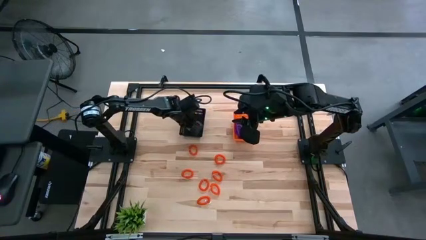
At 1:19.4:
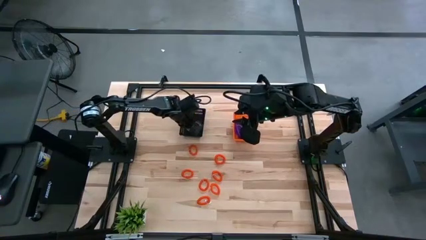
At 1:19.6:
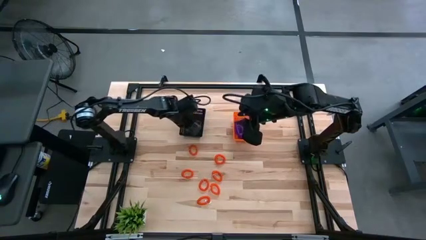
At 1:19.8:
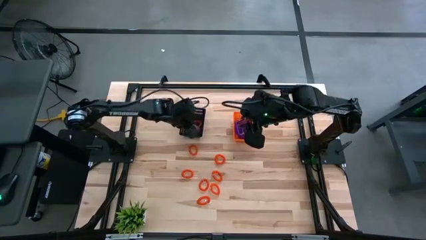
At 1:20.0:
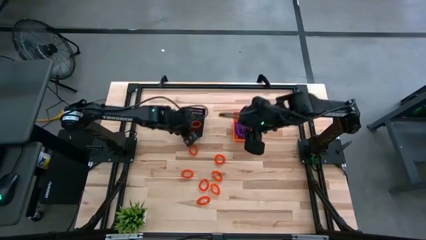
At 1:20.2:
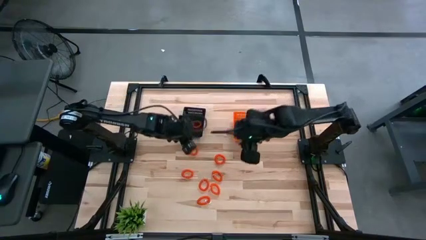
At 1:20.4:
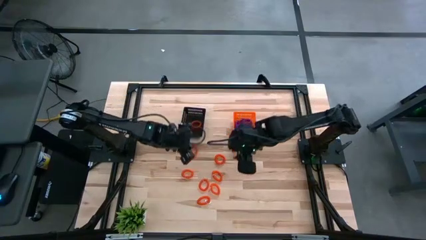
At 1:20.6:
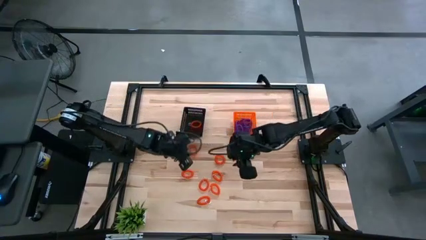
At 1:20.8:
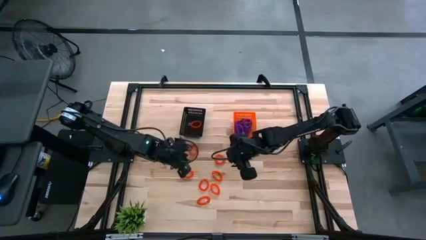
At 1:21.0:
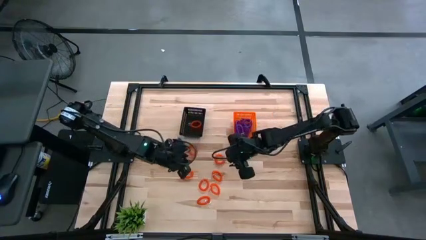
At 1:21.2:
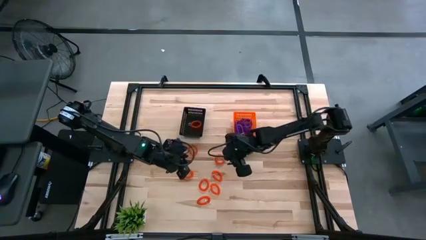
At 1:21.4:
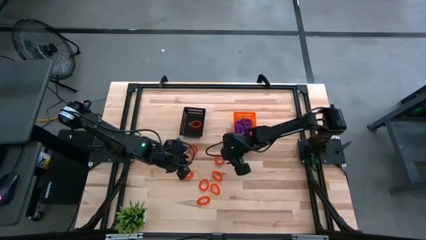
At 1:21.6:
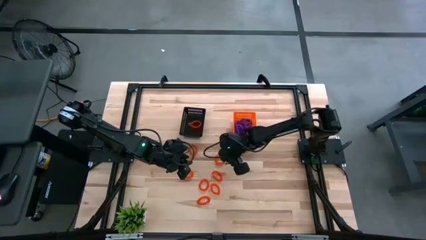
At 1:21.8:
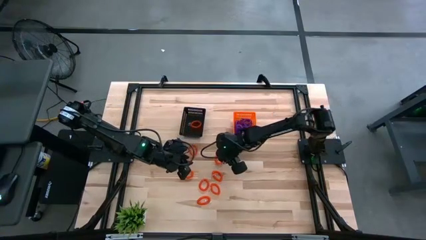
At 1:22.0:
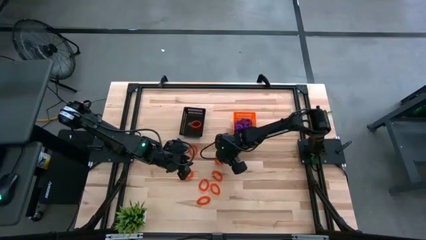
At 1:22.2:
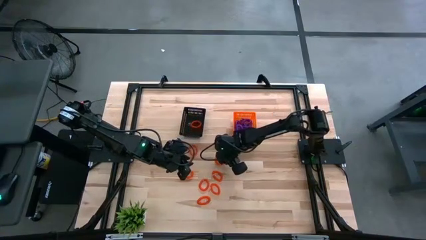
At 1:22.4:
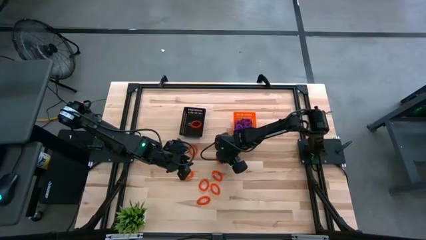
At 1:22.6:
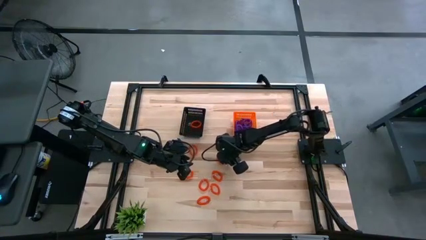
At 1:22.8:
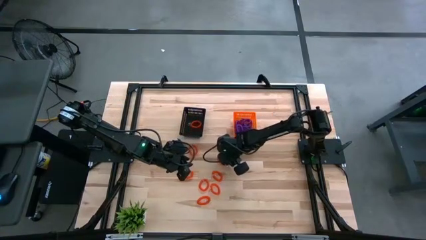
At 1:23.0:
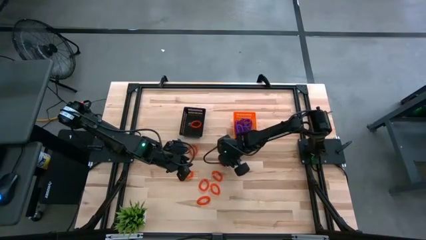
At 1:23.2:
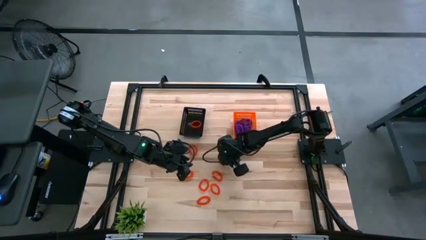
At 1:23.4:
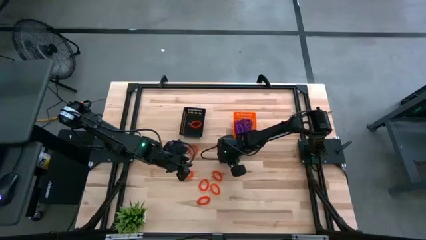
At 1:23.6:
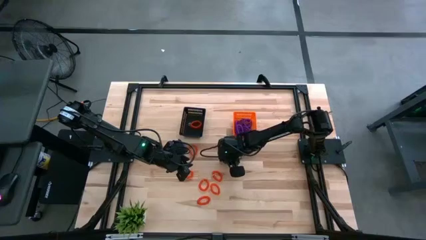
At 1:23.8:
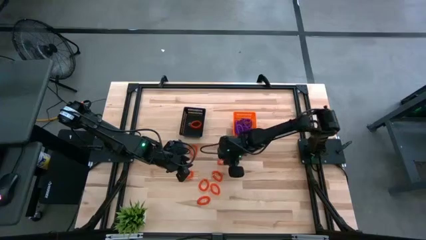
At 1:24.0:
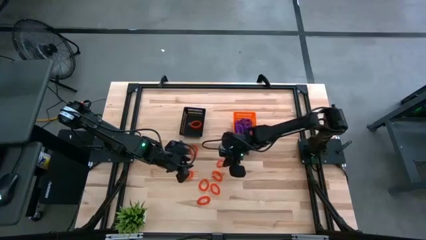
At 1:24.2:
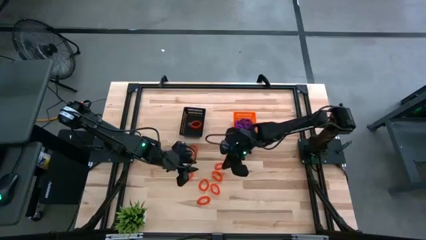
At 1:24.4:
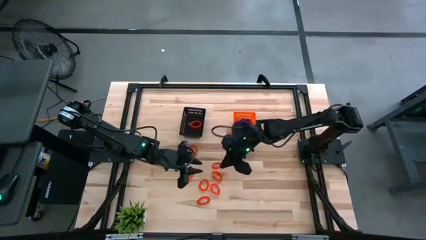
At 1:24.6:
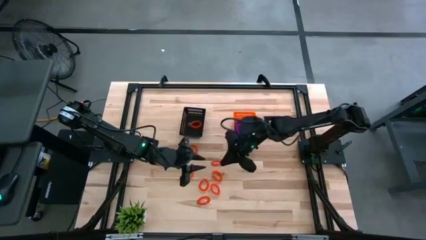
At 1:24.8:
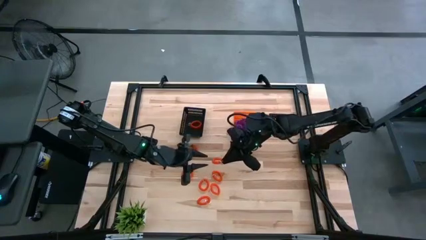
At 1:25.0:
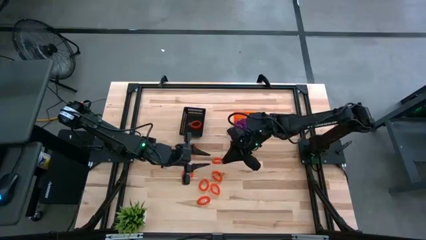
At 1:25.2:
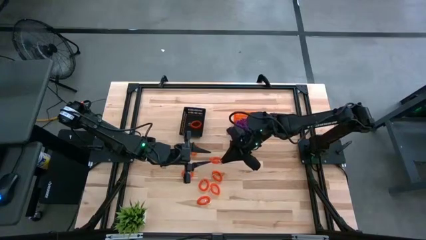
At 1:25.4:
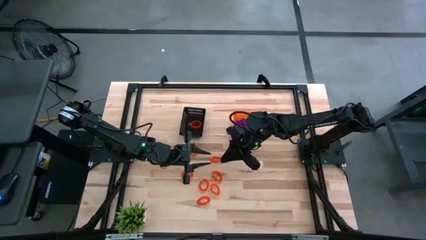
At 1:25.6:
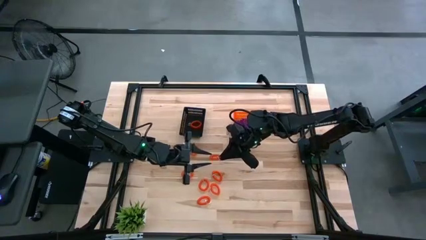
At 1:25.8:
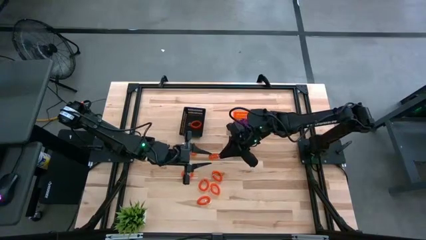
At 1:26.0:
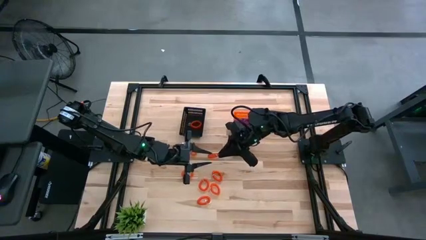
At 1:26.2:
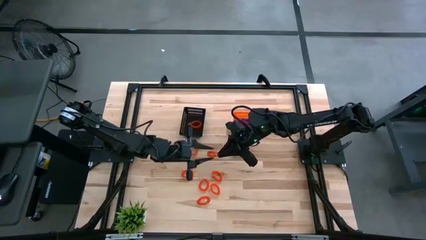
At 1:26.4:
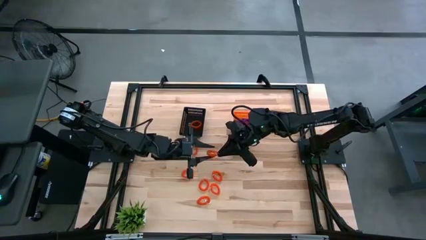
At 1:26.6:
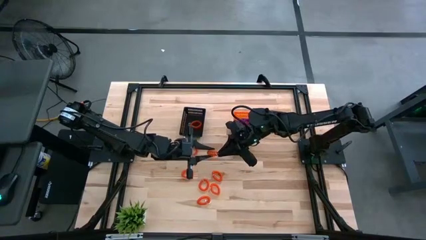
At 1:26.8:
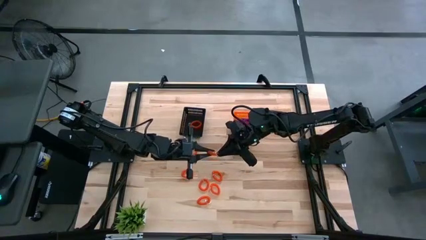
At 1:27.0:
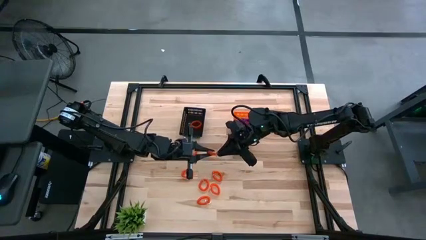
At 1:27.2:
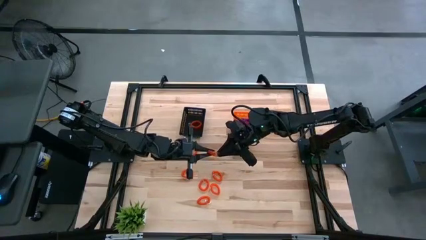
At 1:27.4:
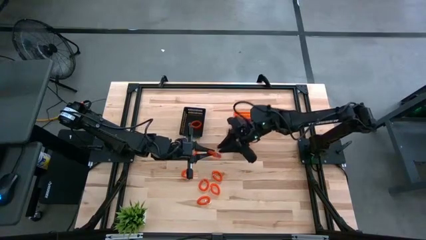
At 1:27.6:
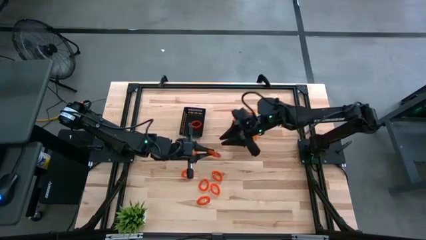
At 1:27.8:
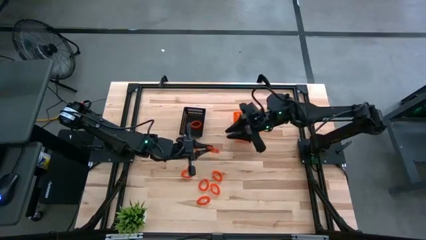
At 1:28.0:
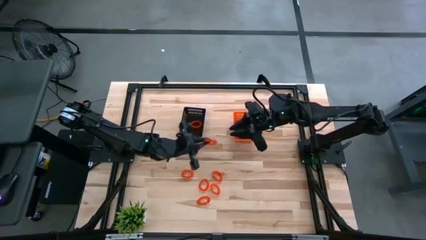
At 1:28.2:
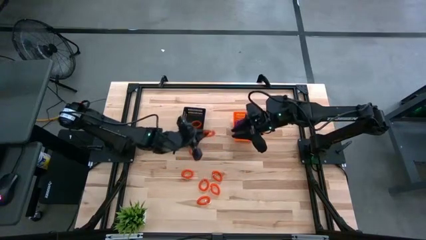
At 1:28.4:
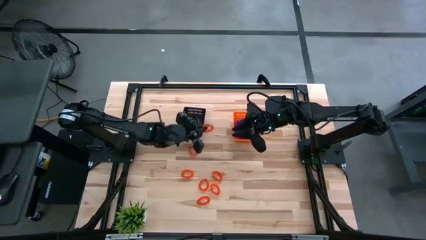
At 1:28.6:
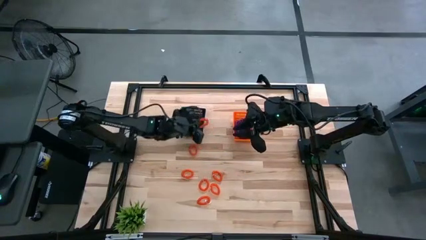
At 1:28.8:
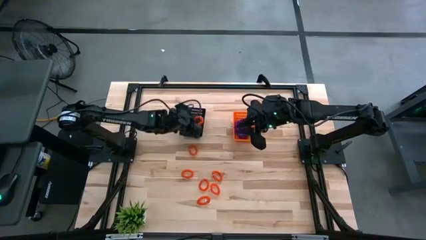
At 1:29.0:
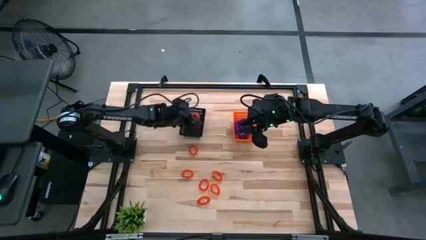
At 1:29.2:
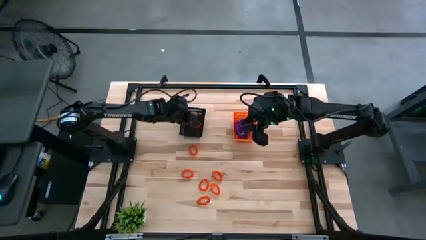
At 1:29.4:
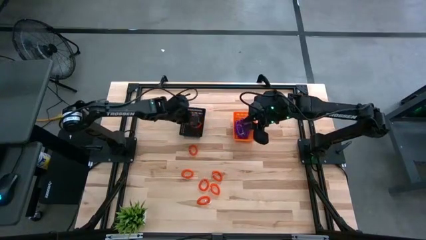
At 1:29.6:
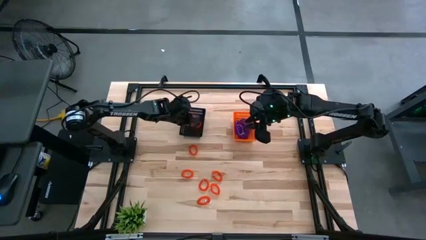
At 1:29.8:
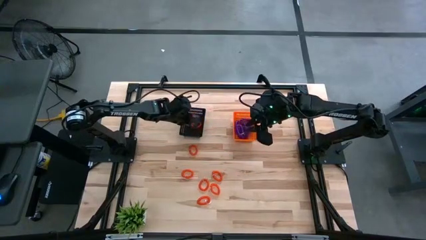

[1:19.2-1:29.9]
Task: Sort spring keychains into baskets
Put the orange spring keychain into the black basket

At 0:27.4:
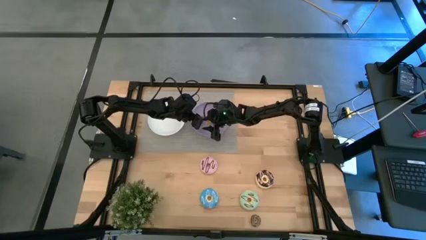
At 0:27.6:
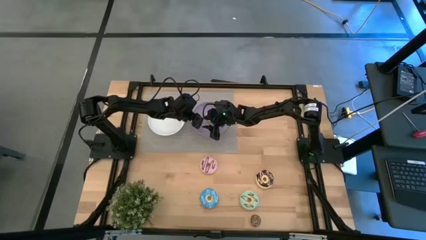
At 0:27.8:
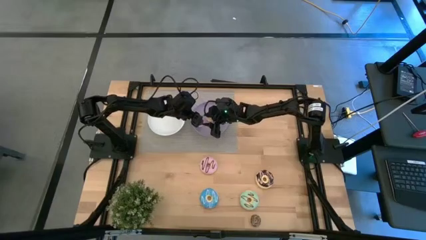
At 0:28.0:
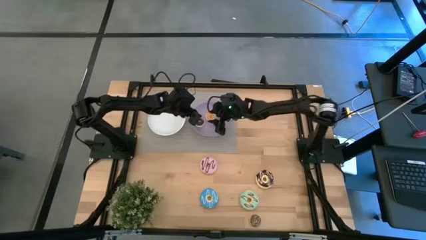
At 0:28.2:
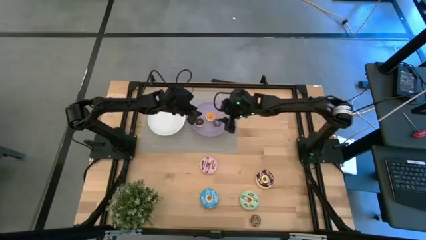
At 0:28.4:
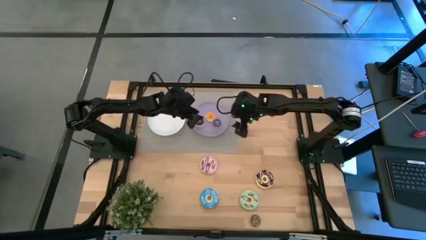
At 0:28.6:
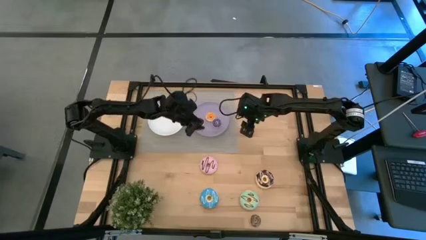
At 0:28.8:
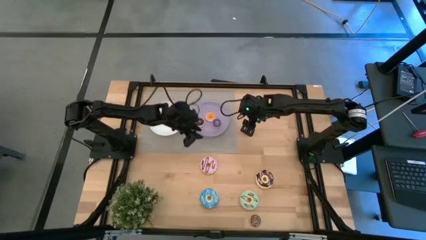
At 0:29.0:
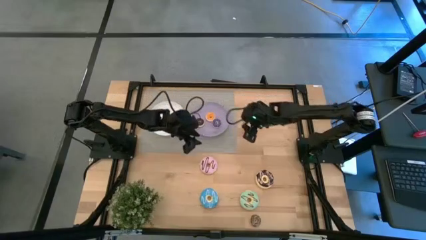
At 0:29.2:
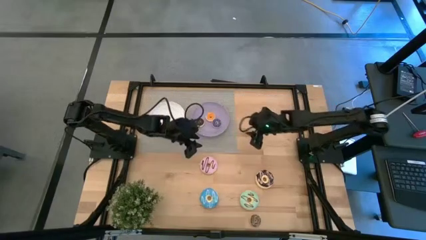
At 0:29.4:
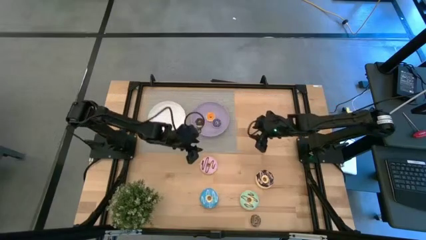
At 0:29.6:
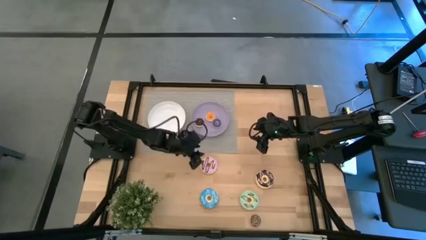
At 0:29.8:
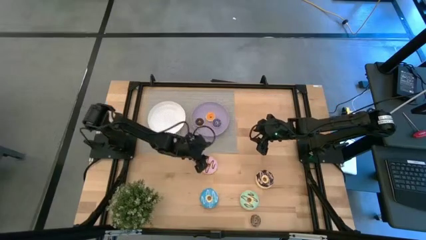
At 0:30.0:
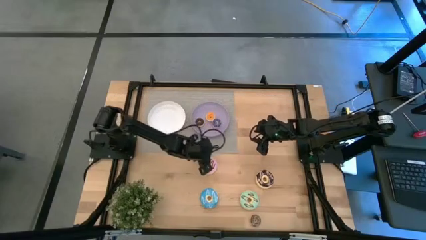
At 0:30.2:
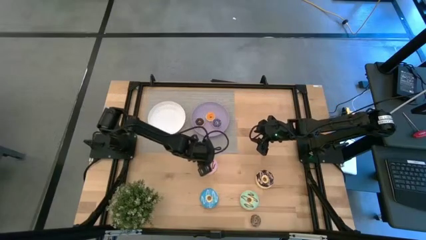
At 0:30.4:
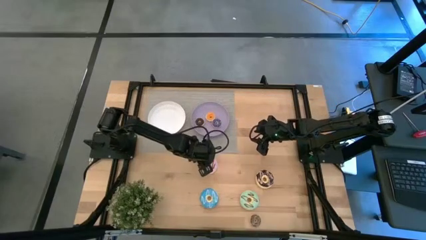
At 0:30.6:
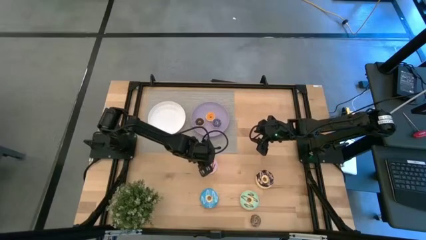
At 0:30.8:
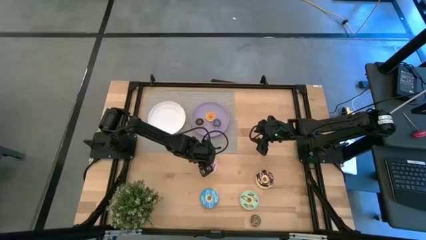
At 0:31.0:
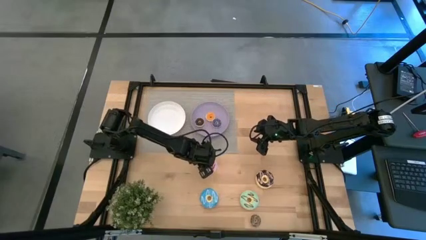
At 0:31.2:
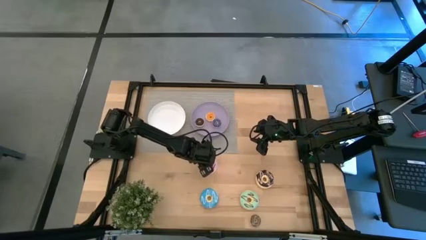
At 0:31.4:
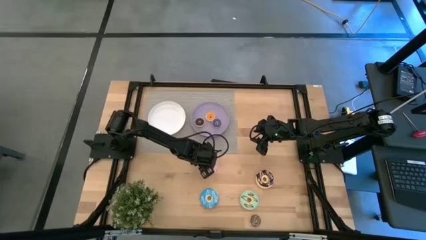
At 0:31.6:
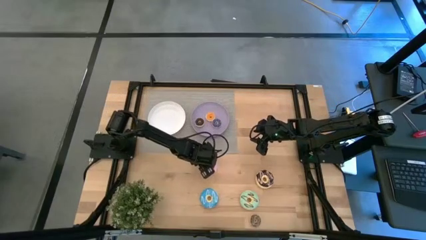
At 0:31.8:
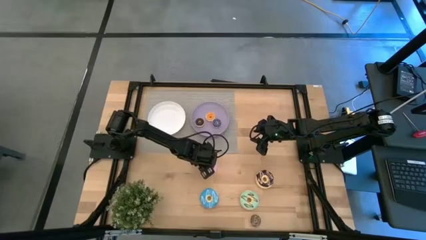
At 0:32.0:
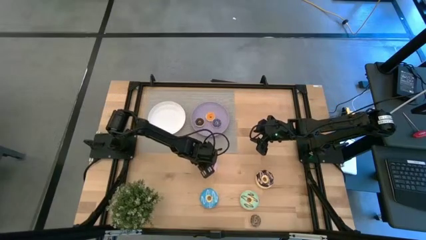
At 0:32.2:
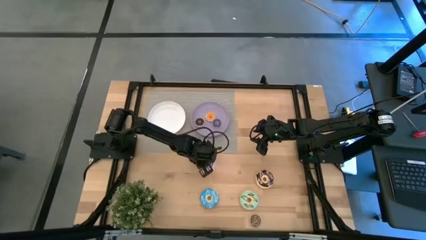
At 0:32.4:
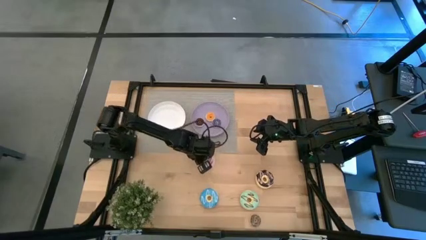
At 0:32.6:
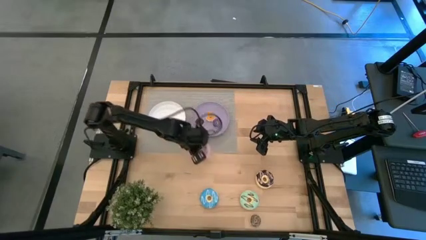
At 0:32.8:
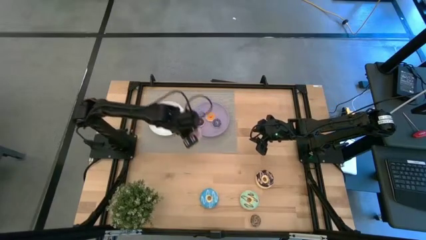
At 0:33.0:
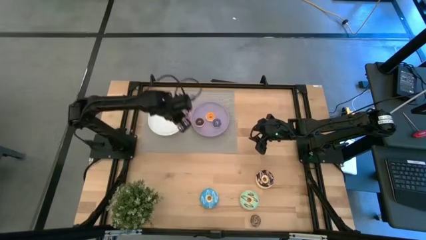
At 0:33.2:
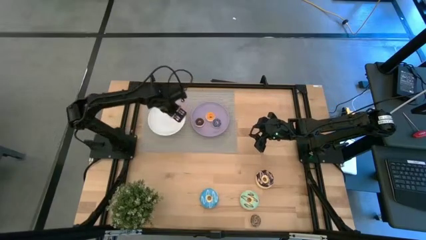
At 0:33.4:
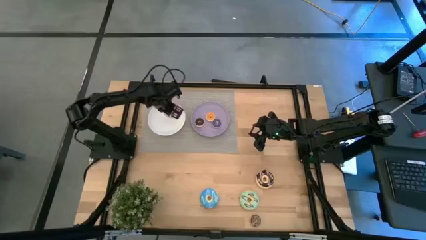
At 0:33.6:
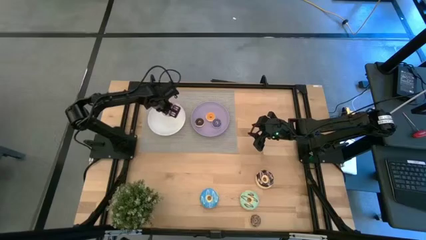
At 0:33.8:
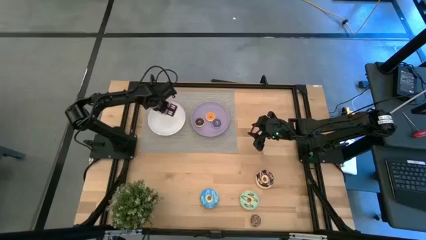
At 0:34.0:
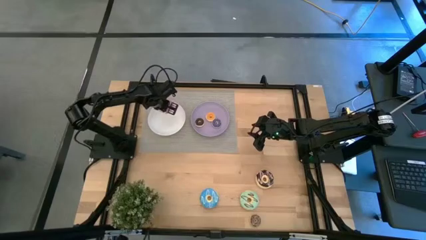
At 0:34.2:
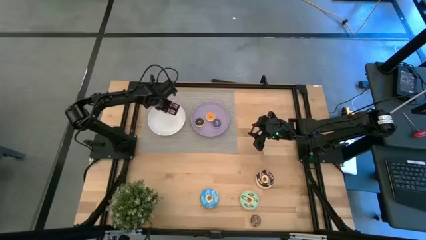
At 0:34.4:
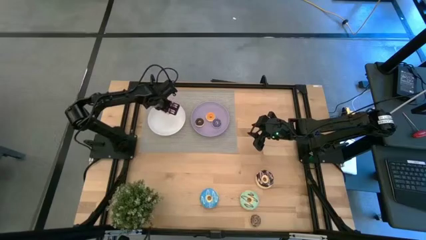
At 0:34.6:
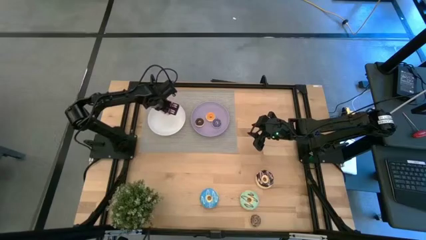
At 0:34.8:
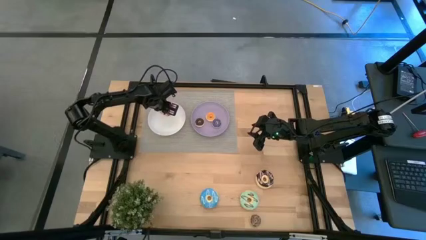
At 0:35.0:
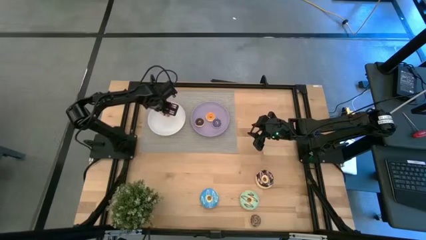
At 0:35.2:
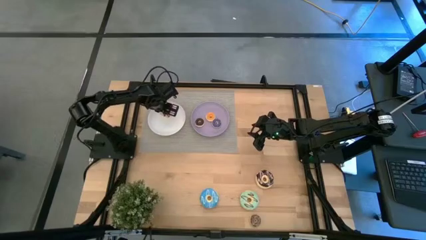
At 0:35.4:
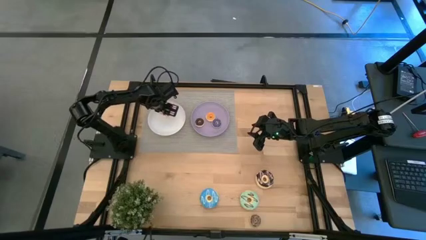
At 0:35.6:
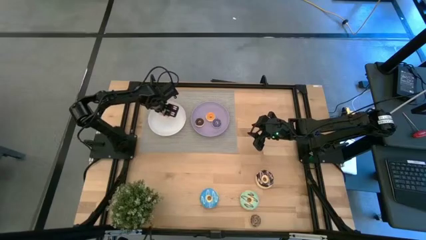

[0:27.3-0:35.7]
Task: Pick & Place donuts
Put the large pink donut on the white plate
